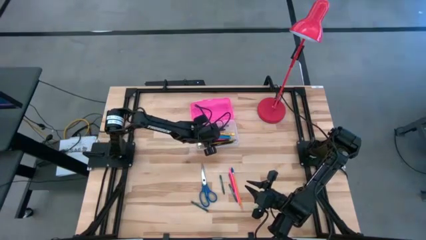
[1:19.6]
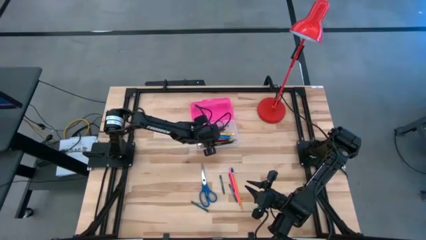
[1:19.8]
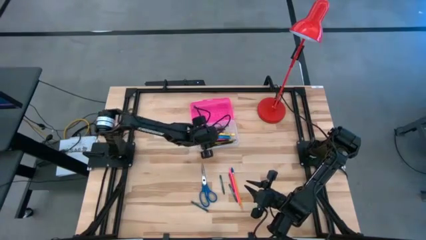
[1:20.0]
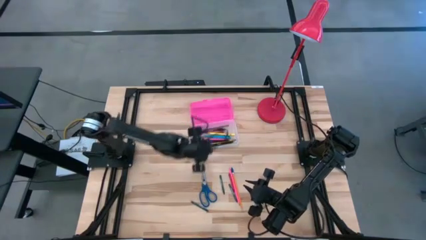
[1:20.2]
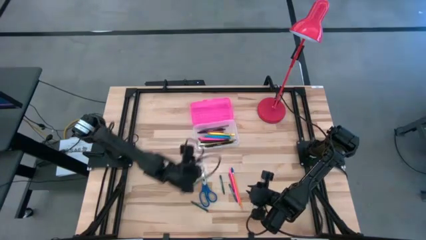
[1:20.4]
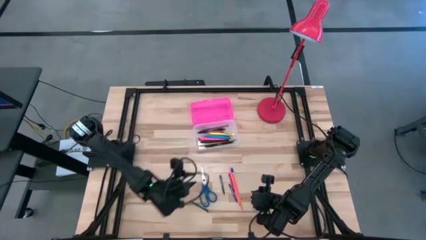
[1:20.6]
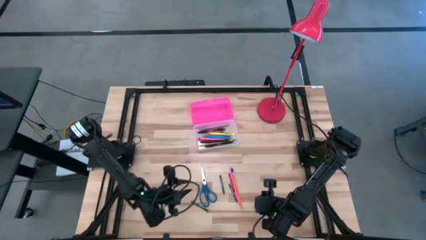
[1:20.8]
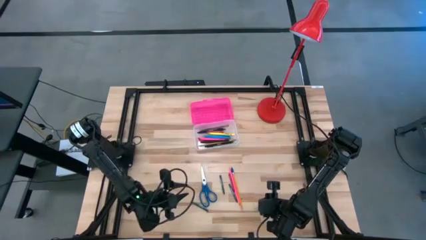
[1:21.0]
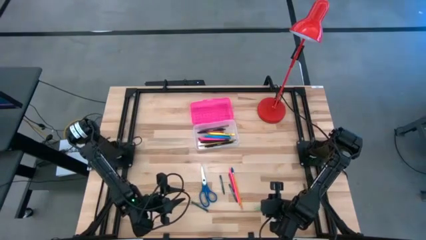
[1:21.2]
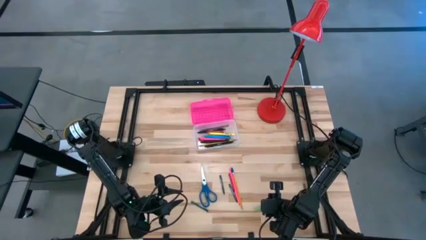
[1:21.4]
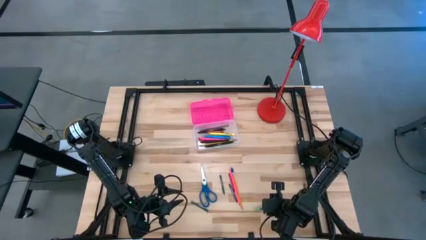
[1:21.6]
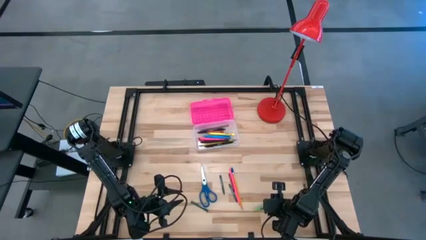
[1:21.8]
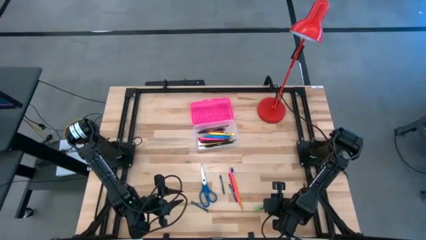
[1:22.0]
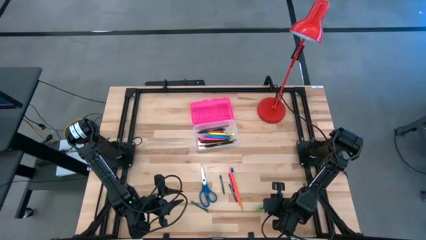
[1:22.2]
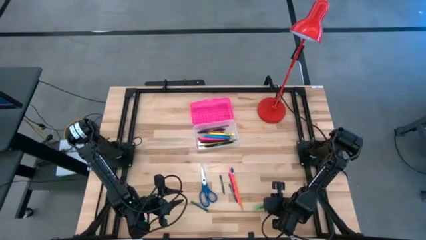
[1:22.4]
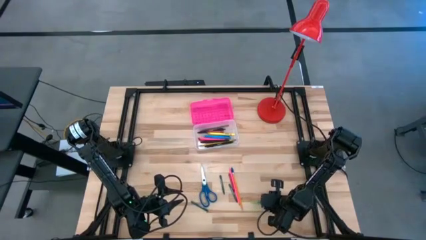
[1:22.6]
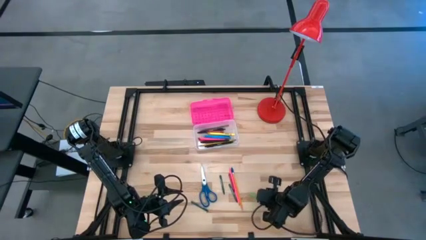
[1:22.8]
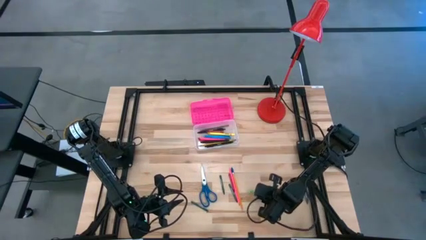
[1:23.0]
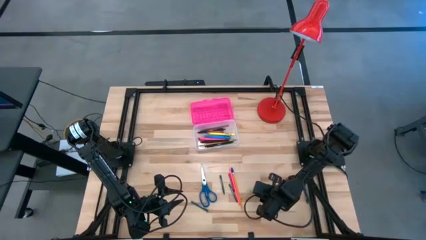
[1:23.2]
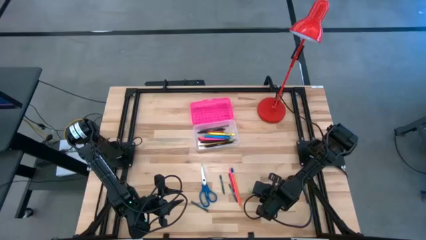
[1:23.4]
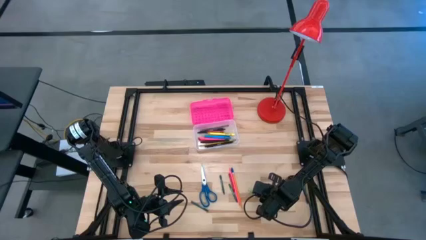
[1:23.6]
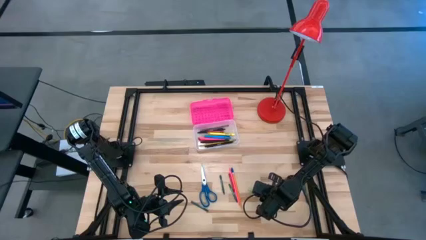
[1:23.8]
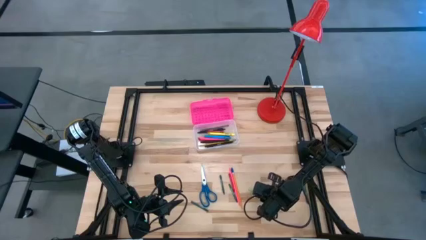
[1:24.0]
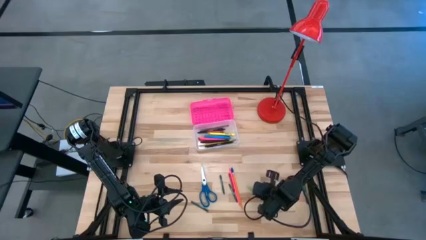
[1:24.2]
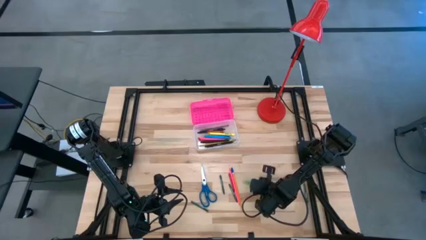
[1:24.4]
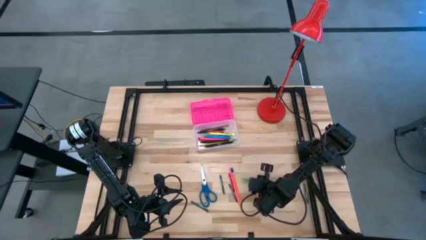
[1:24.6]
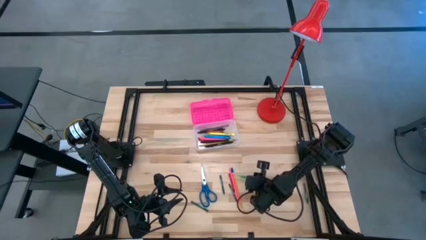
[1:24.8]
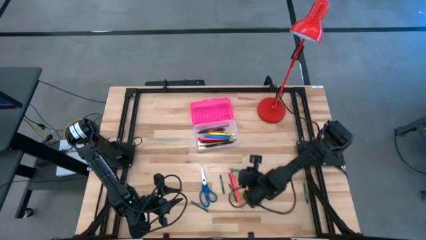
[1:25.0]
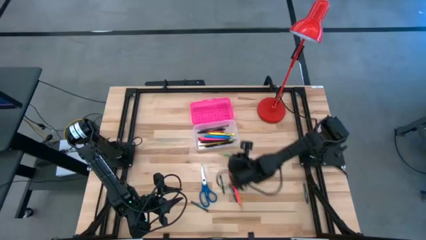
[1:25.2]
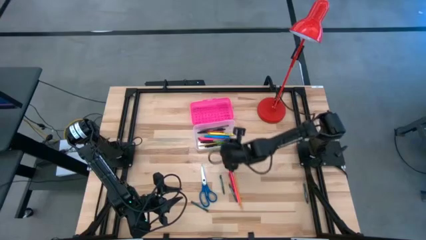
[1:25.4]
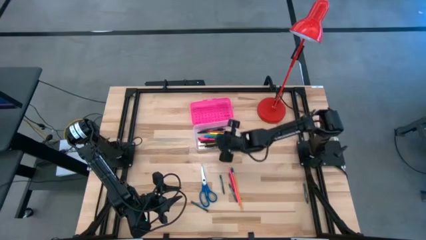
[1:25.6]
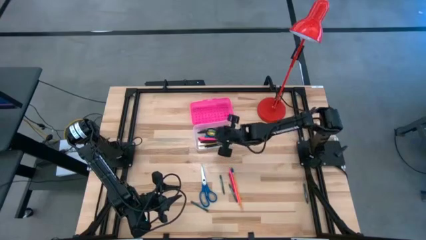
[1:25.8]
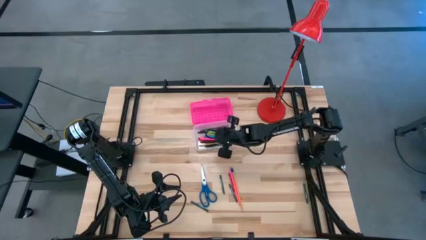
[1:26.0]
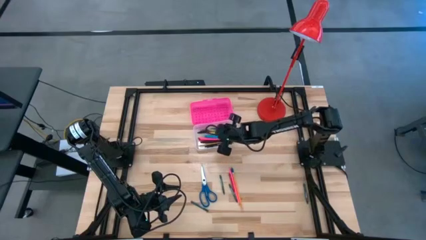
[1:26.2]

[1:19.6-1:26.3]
Task: Pick & place school supplies into a supply box
Put the green pen into the pink supply box

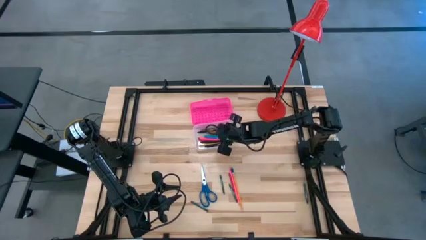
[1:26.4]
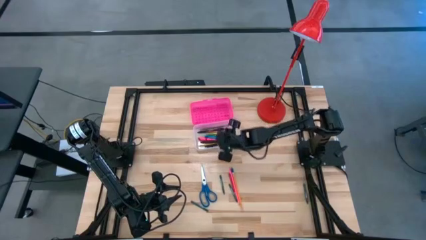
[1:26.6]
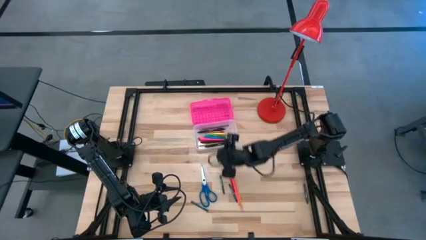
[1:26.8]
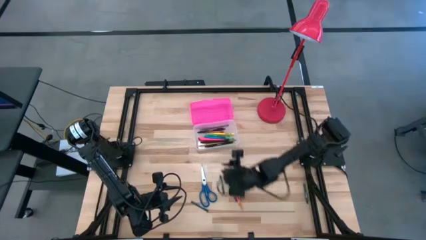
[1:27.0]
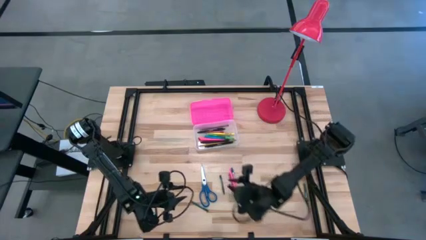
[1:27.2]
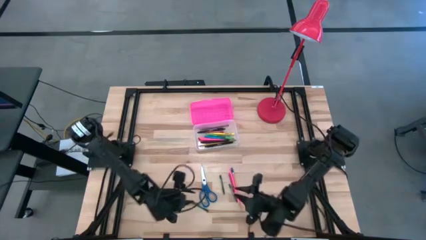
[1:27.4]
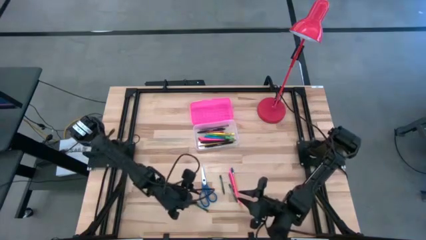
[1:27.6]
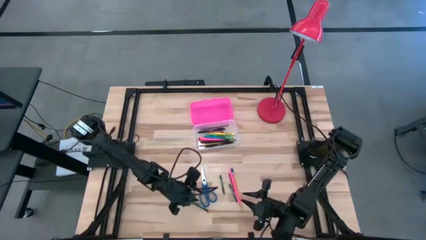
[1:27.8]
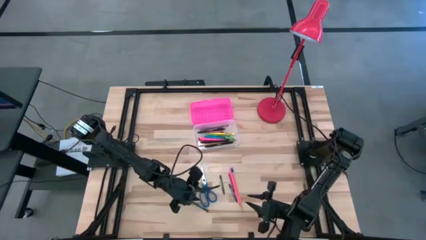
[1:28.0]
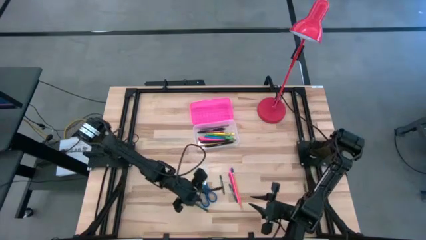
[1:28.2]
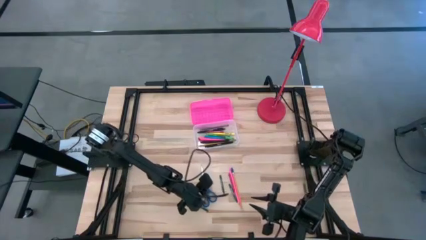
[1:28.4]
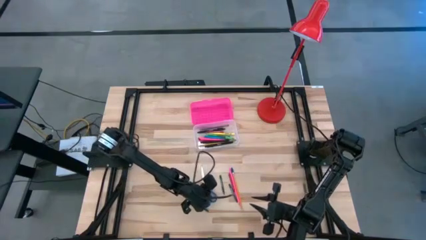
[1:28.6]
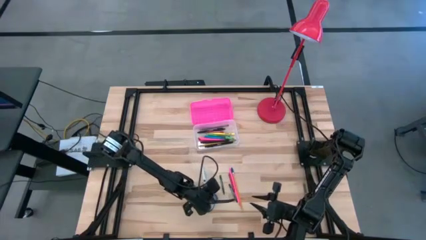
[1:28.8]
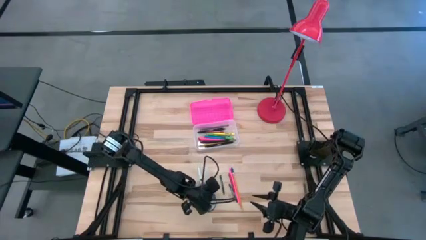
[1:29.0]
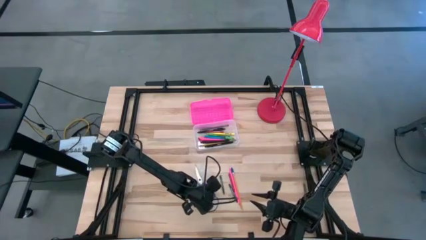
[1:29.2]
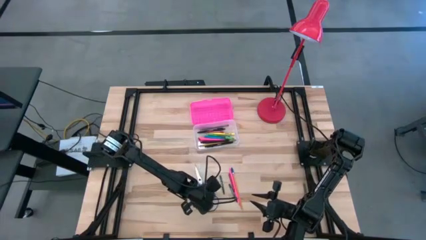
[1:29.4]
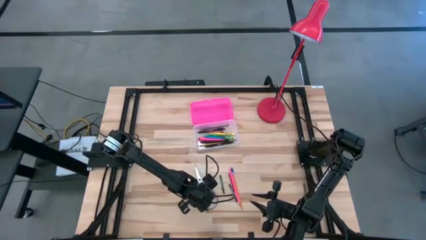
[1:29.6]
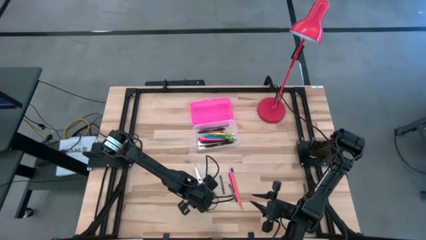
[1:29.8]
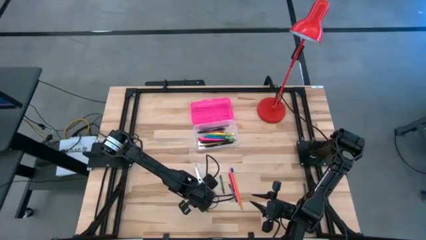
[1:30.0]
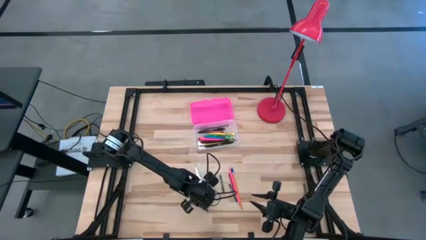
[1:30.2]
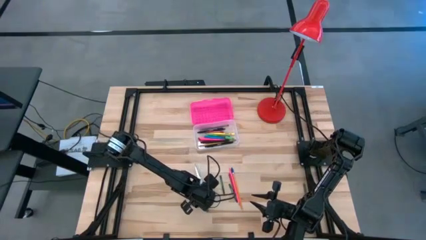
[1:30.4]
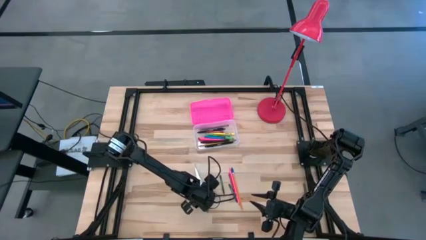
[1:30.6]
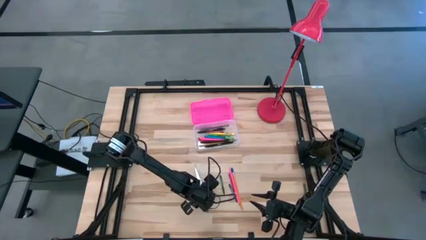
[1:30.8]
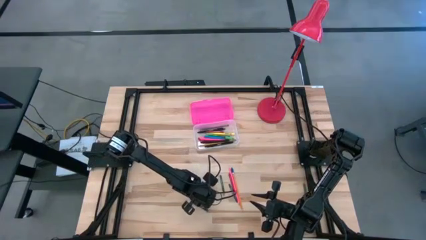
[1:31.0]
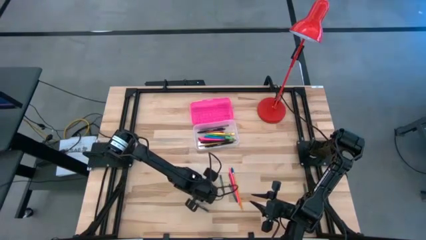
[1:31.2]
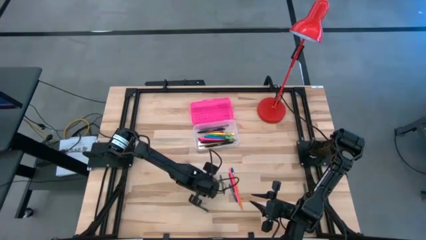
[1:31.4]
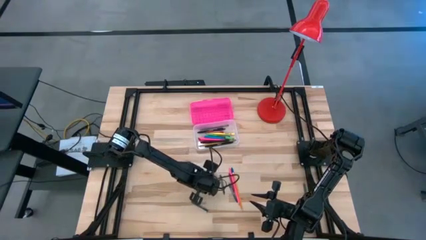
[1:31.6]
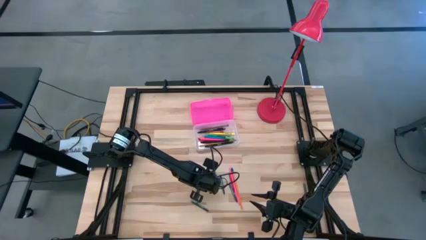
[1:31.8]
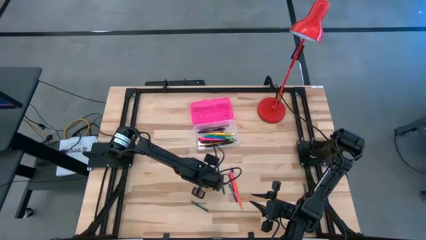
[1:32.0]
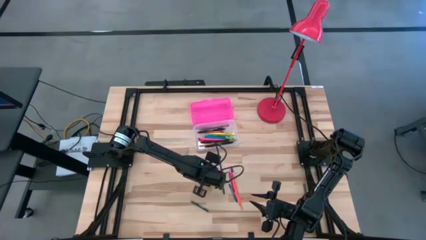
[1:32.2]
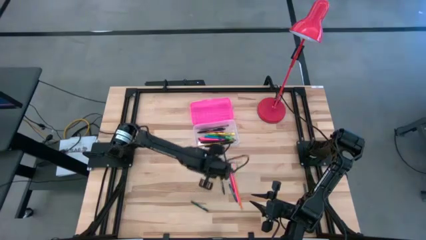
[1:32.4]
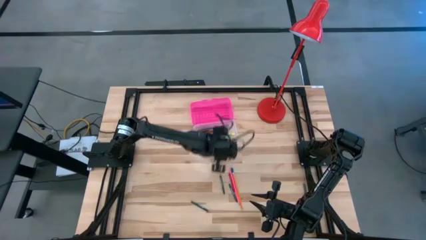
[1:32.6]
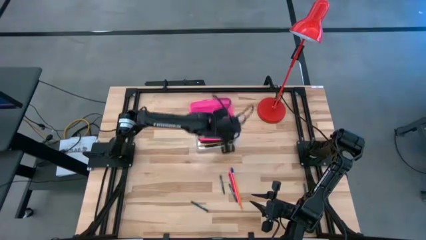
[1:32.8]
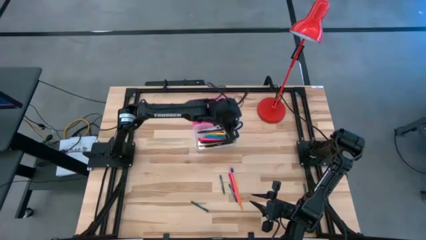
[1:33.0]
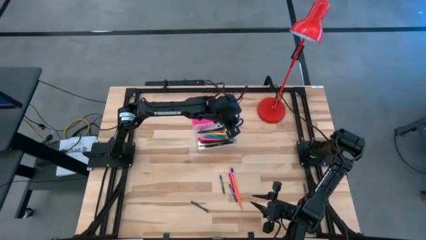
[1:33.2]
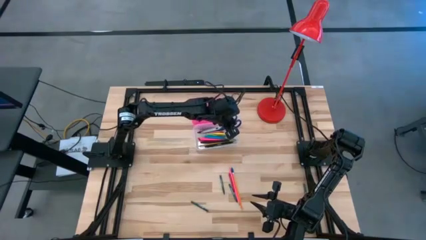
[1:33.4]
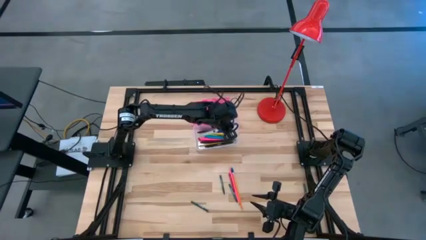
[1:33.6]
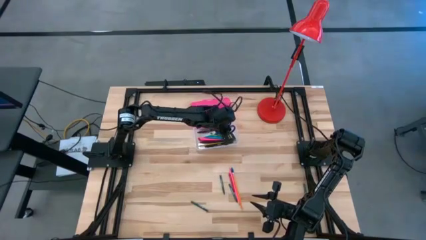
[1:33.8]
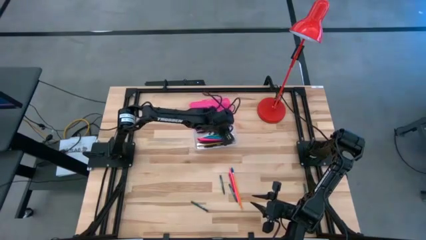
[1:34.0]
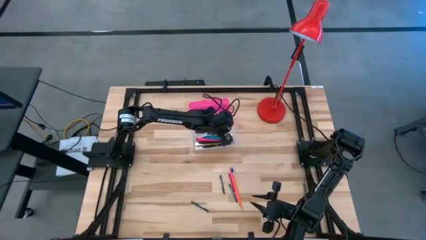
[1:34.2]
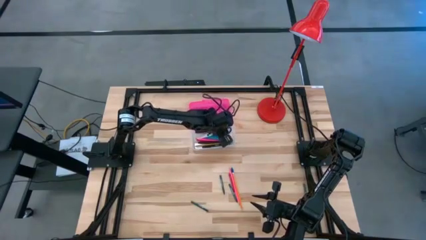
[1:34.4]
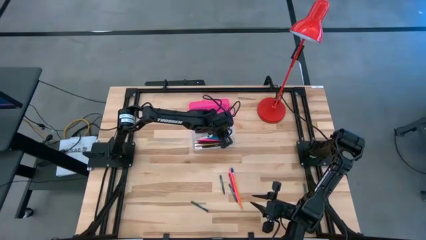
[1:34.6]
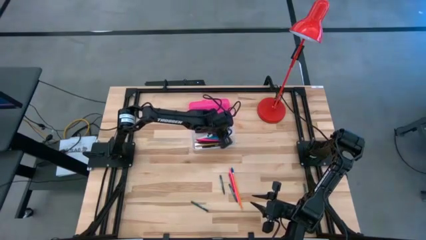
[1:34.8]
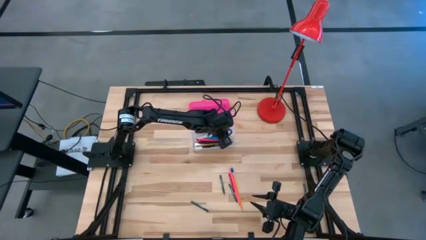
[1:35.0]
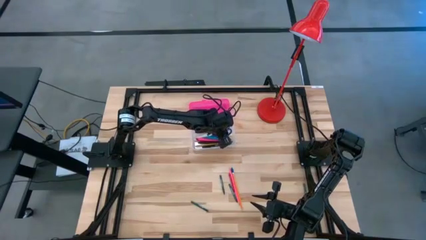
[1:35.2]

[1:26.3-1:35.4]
Put the blue scissor into the pink supply box
